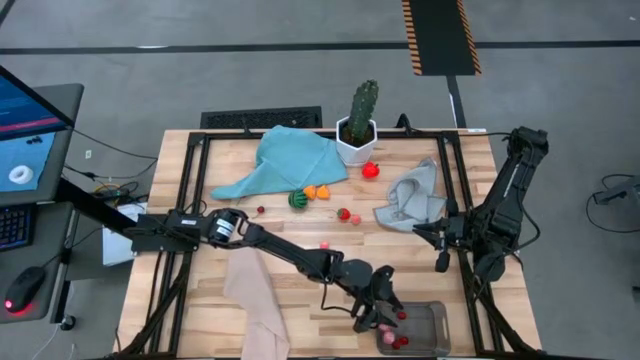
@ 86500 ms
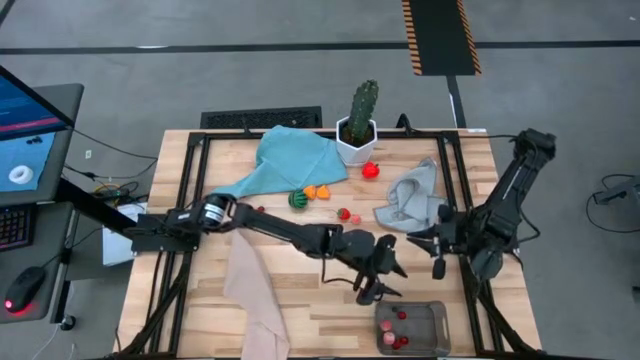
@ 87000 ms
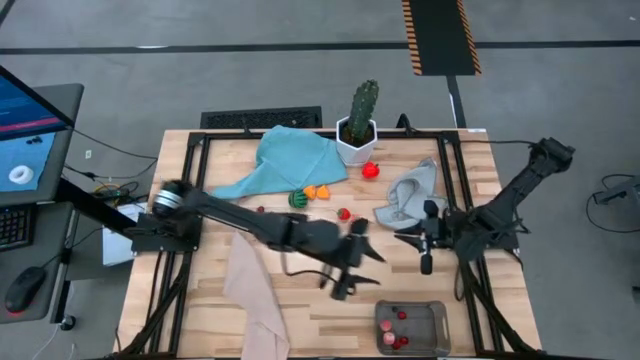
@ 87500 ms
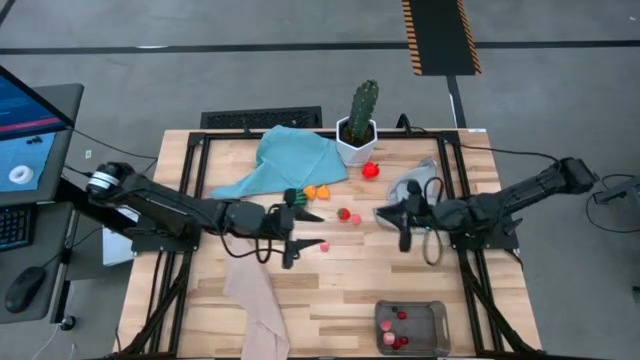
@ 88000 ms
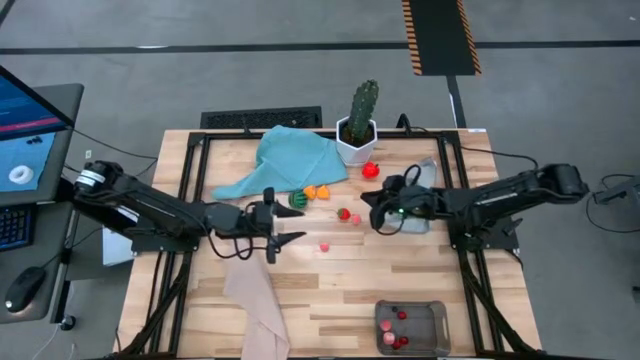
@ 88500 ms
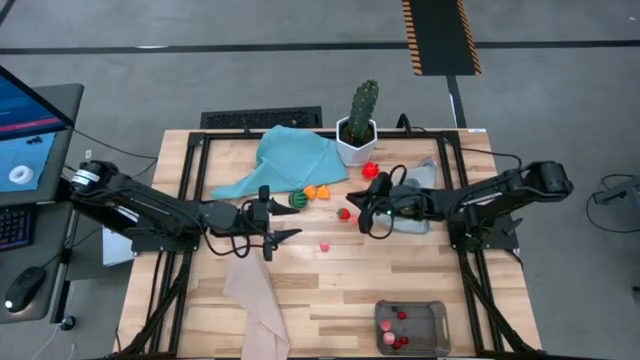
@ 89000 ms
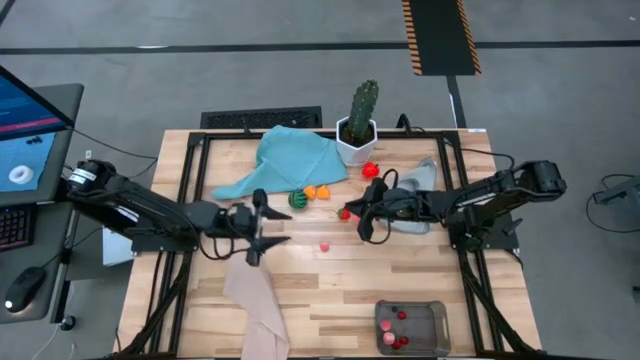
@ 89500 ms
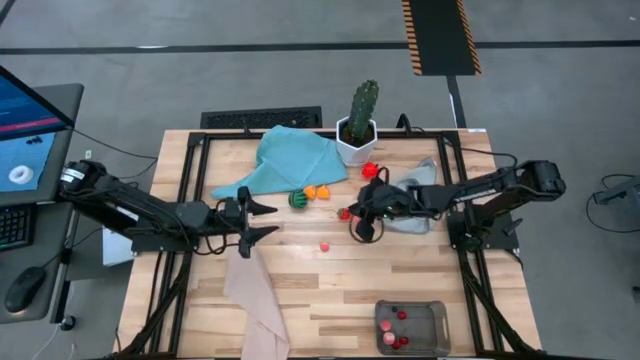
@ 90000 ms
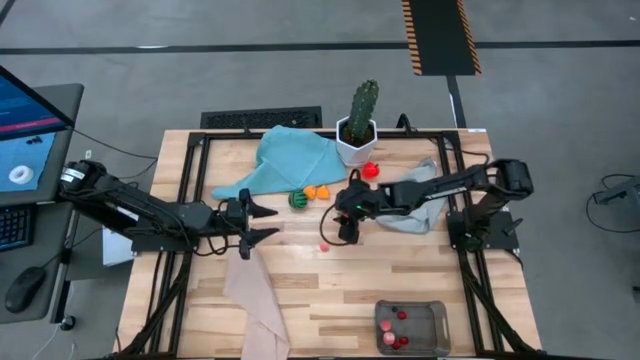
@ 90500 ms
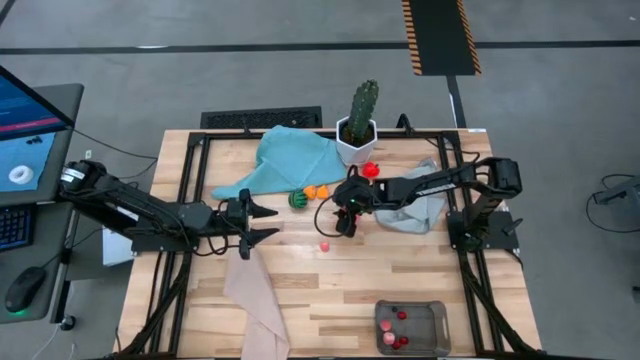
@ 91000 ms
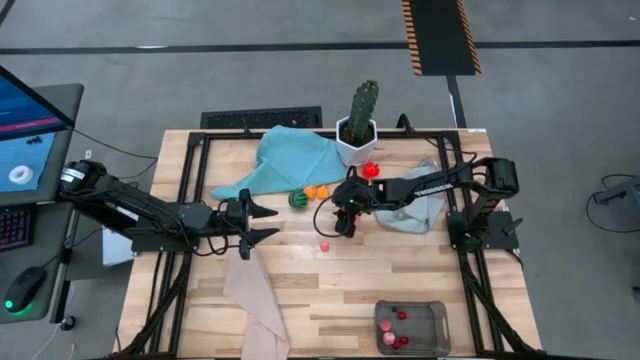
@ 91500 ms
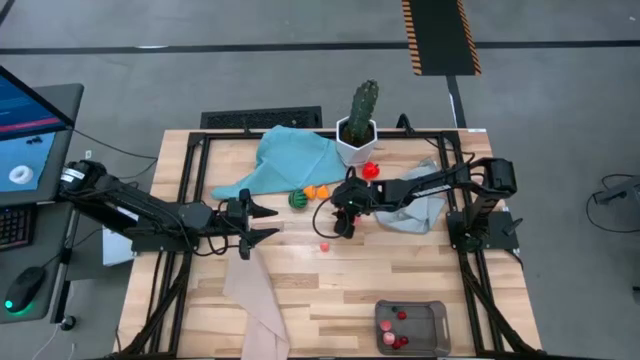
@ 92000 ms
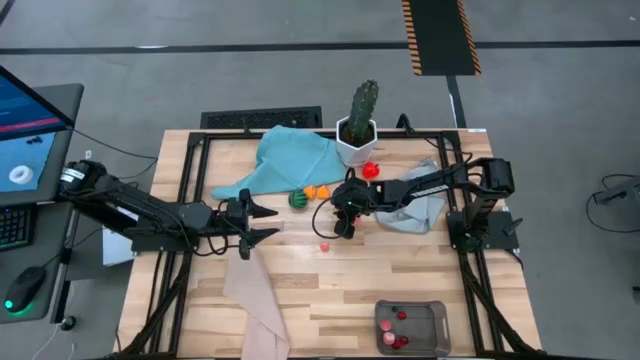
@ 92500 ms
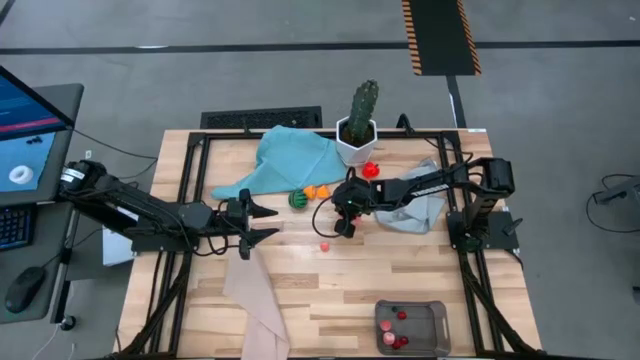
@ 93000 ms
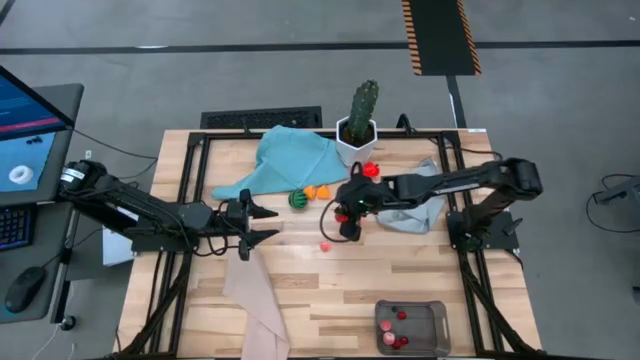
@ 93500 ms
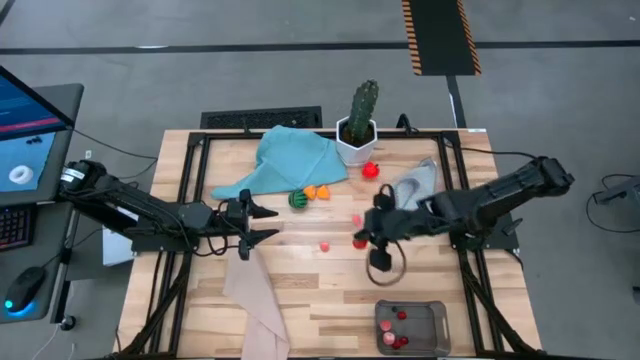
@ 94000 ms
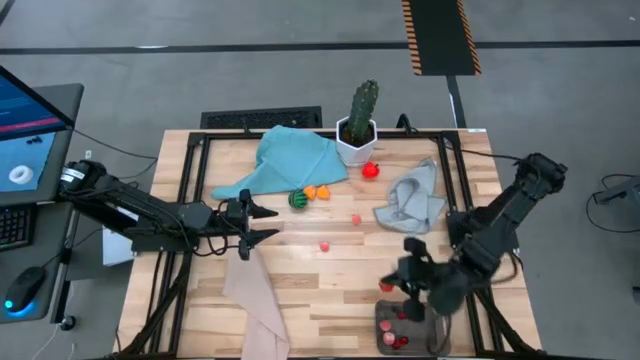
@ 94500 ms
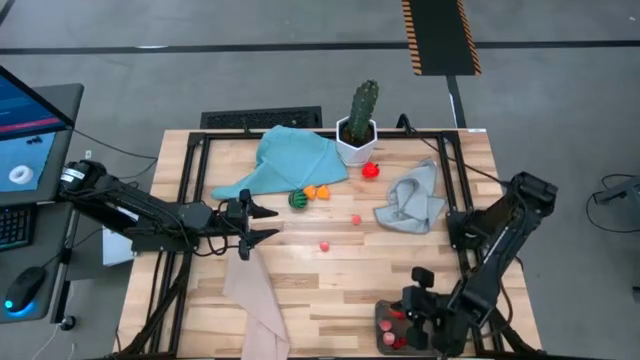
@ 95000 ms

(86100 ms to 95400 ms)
Task: Pick and placing Produce into tupperware
Put the strawberry into the black bin

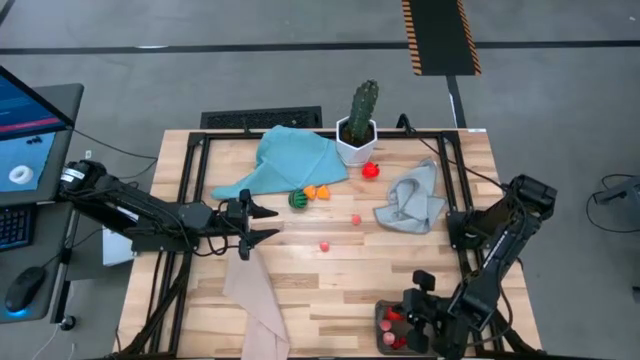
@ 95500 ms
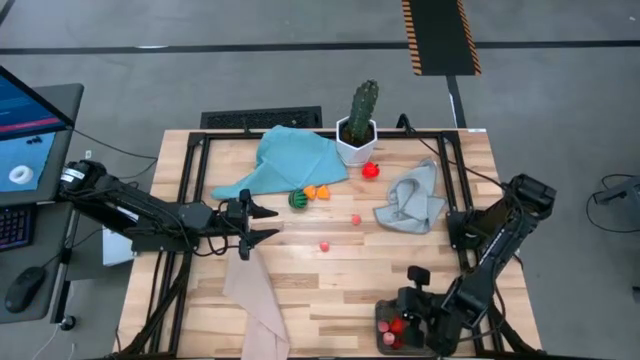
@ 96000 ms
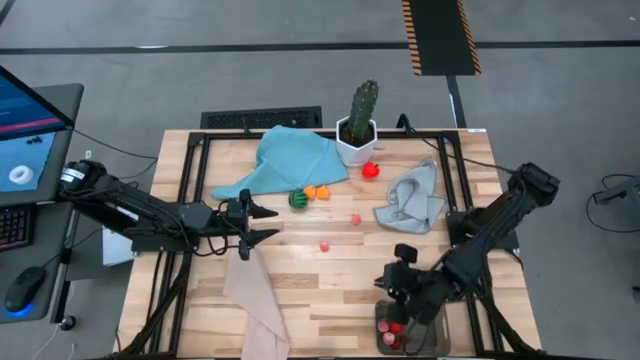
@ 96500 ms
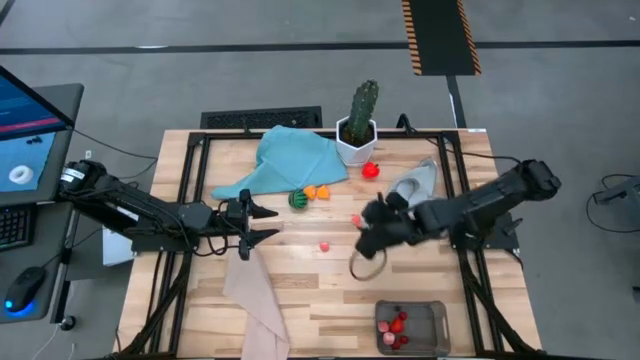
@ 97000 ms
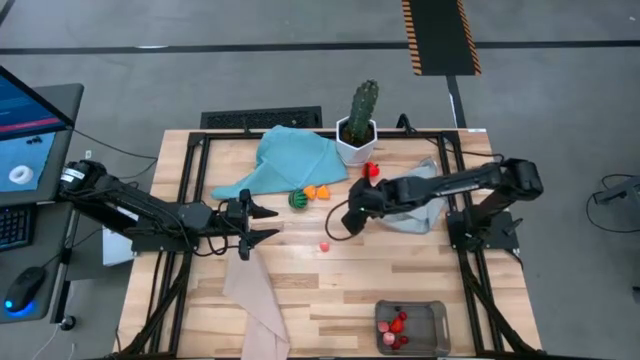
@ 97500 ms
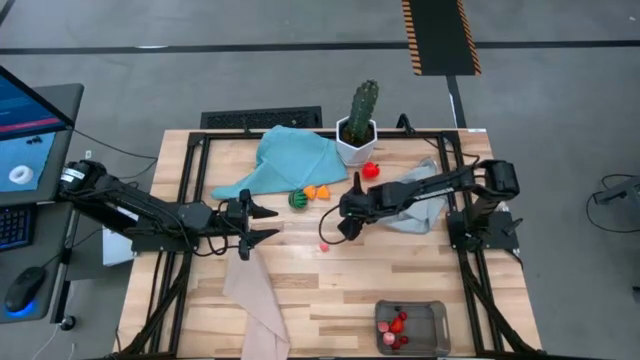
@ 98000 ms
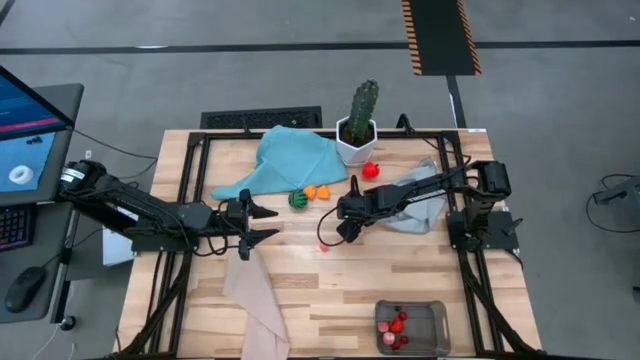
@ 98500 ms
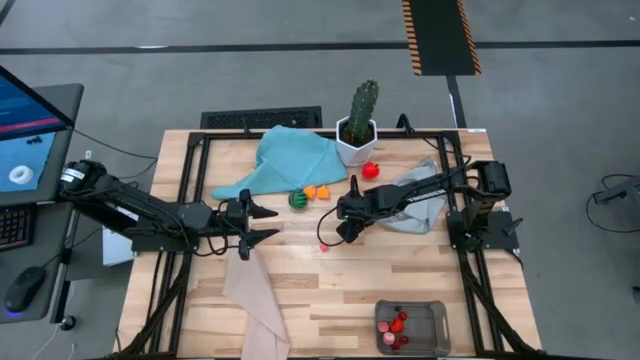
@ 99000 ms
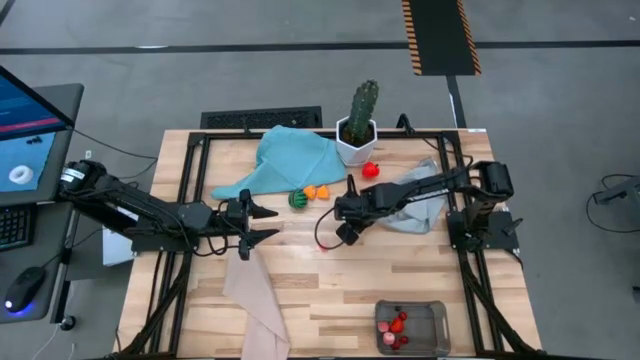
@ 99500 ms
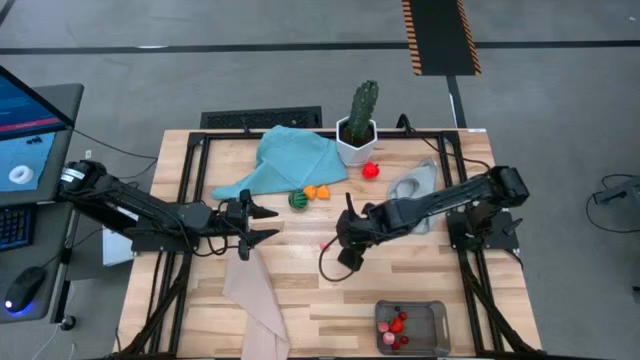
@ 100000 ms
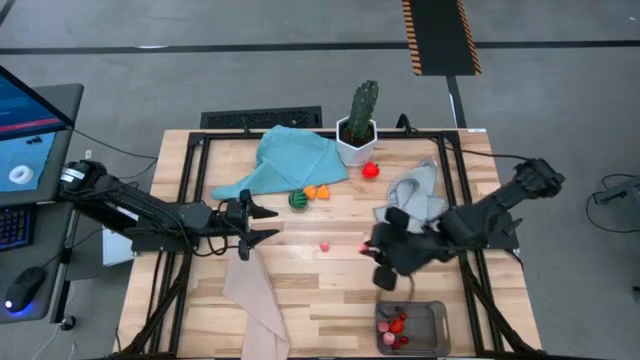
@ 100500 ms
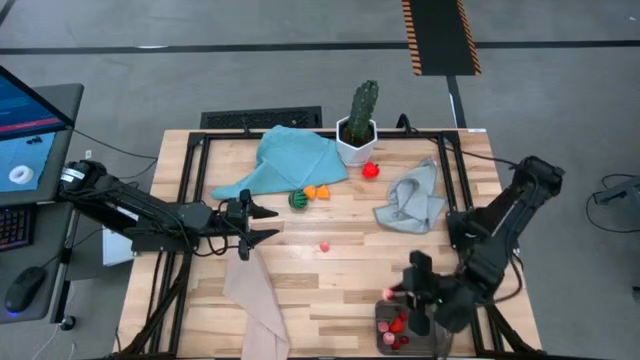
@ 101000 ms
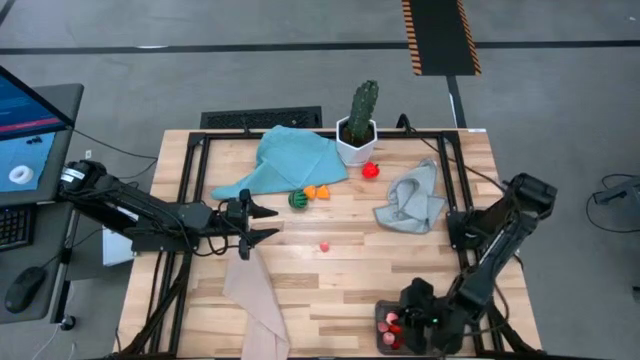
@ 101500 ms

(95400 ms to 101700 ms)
Put the peach into the black bin

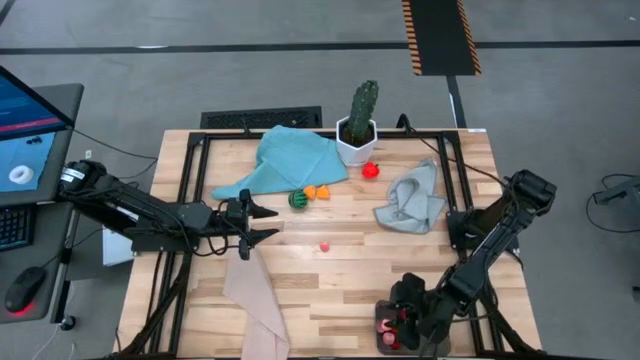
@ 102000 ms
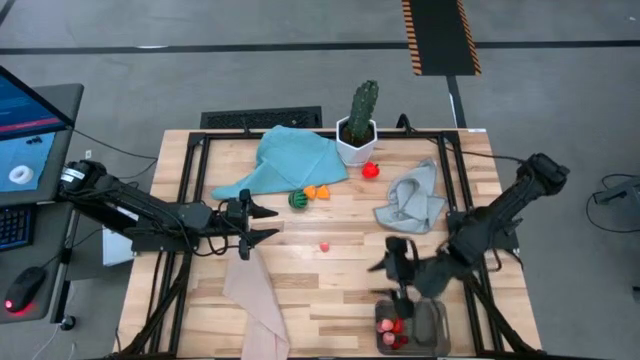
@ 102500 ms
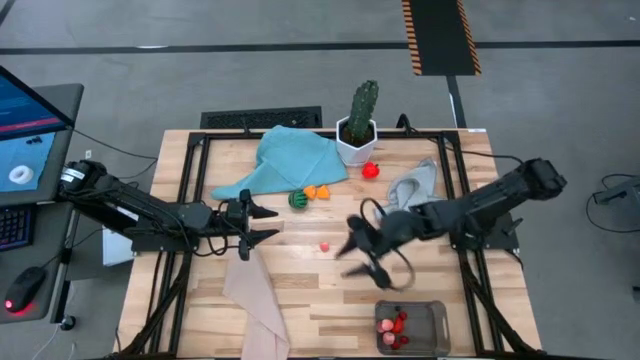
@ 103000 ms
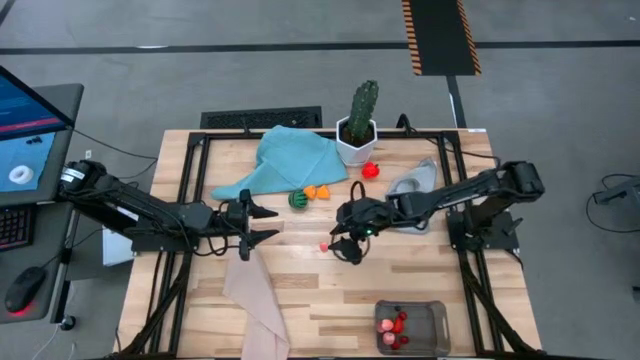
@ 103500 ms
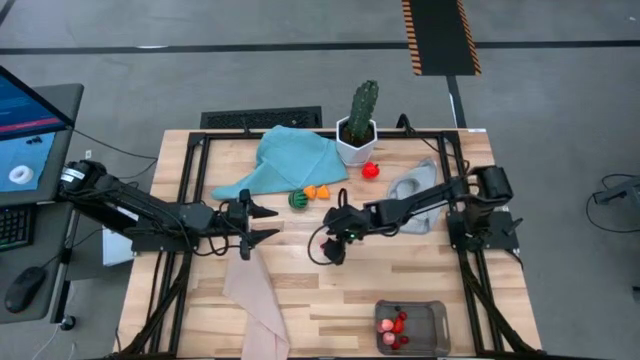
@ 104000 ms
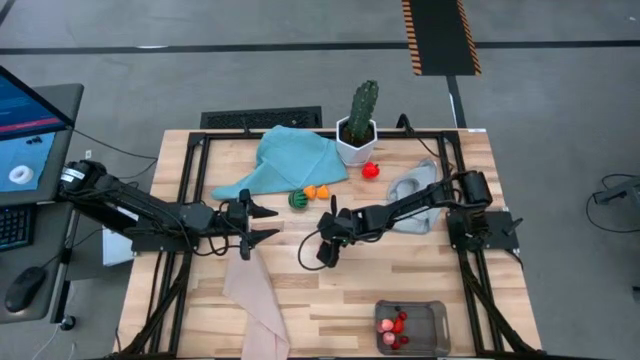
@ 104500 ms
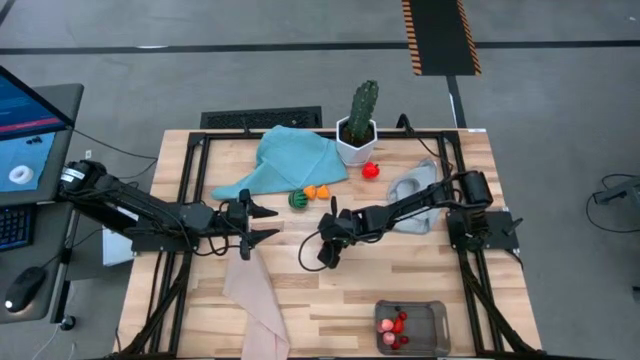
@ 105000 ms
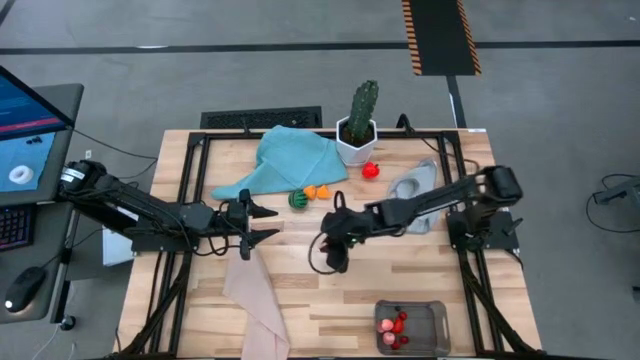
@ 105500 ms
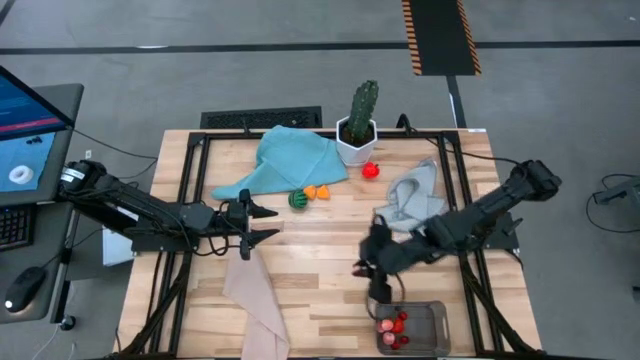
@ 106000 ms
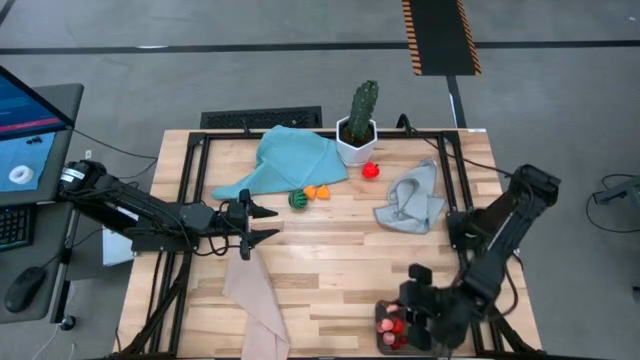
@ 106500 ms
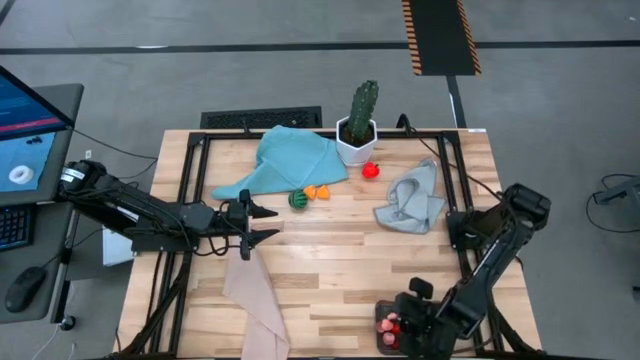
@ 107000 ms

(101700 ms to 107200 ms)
Put the peach into the black bin
